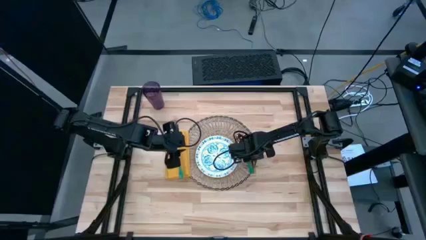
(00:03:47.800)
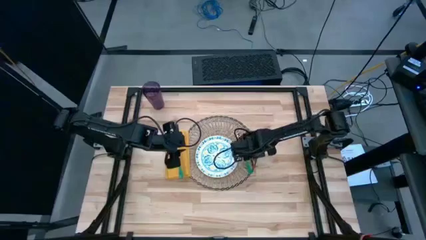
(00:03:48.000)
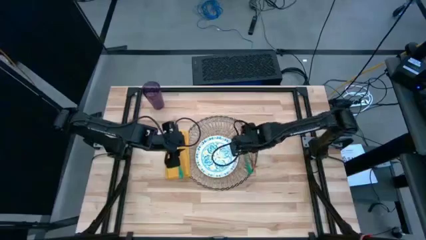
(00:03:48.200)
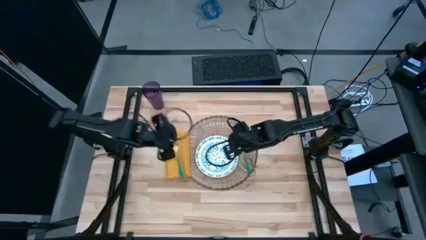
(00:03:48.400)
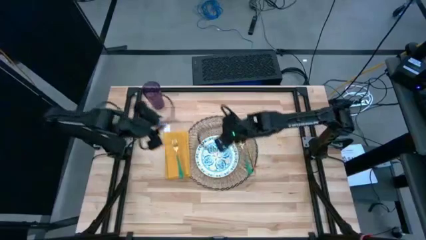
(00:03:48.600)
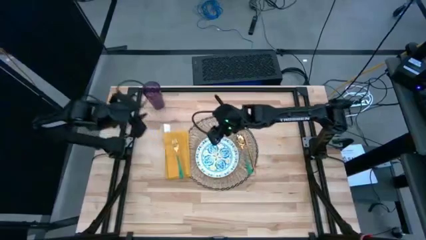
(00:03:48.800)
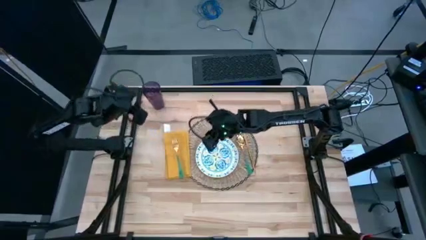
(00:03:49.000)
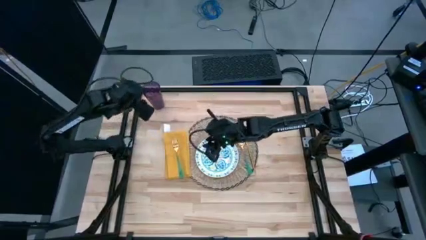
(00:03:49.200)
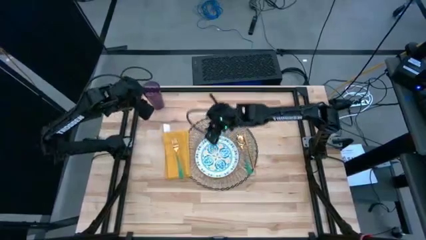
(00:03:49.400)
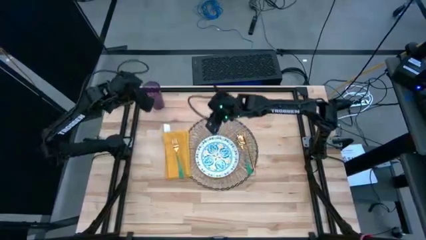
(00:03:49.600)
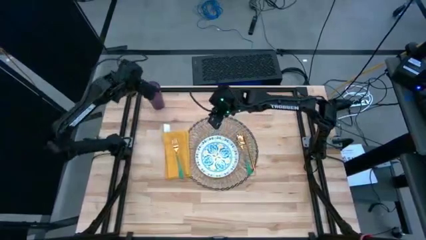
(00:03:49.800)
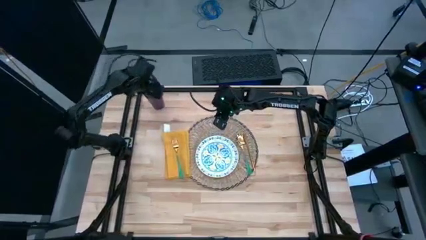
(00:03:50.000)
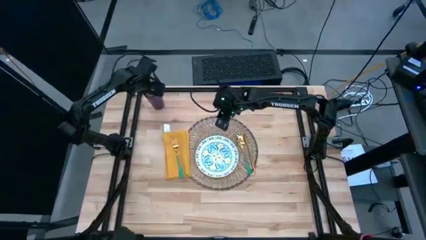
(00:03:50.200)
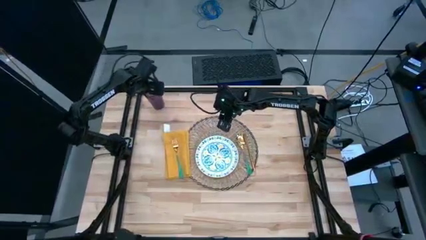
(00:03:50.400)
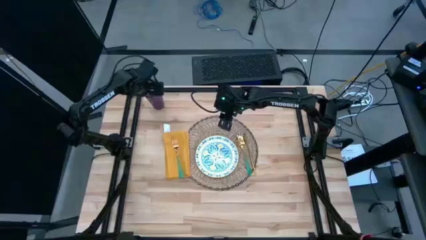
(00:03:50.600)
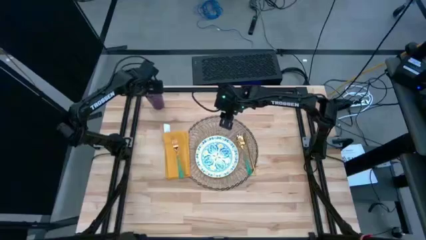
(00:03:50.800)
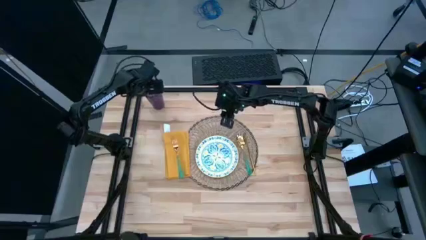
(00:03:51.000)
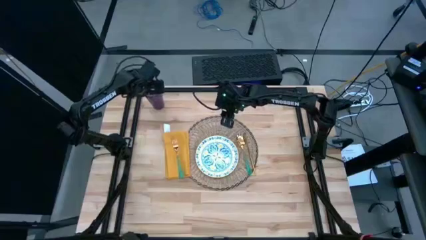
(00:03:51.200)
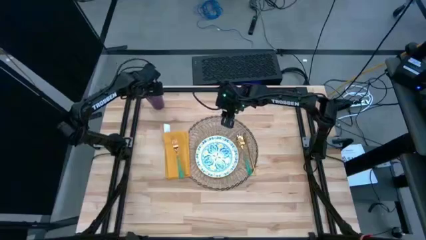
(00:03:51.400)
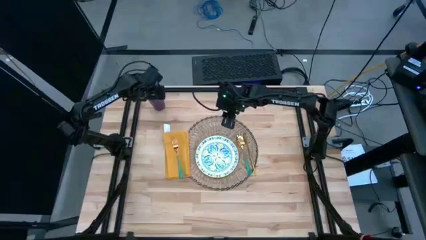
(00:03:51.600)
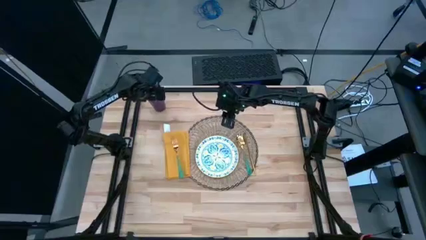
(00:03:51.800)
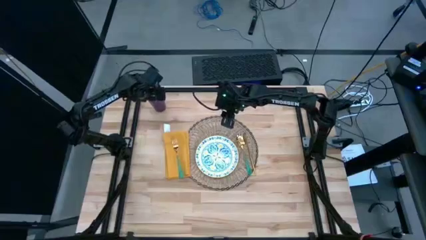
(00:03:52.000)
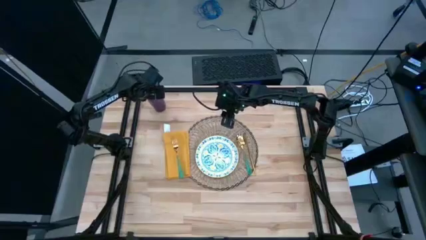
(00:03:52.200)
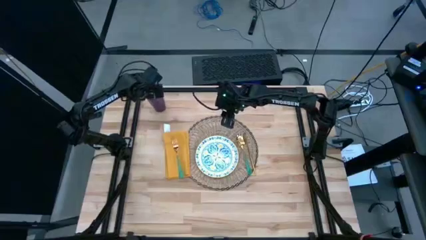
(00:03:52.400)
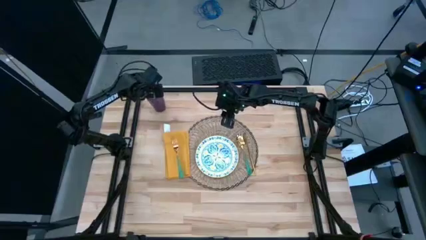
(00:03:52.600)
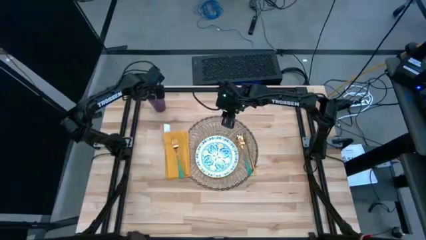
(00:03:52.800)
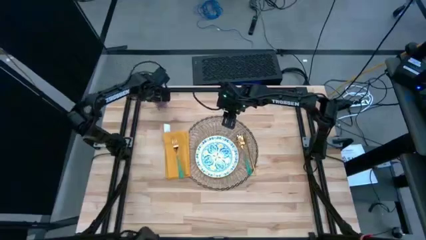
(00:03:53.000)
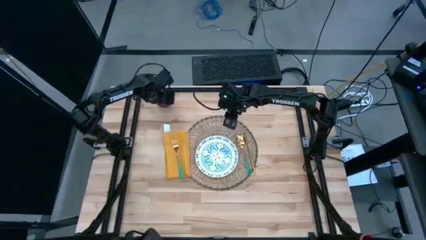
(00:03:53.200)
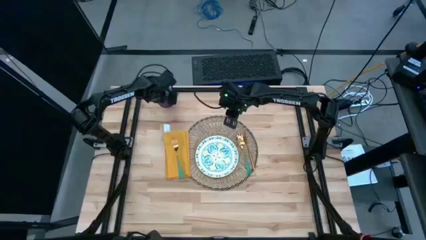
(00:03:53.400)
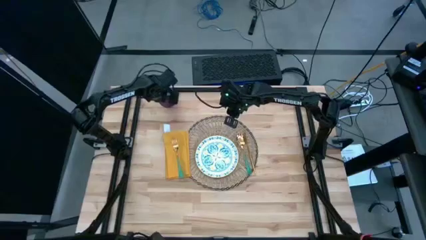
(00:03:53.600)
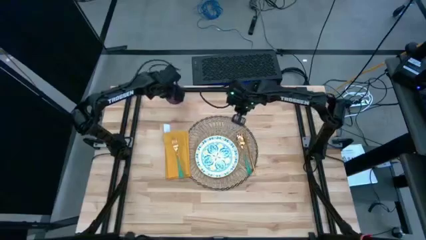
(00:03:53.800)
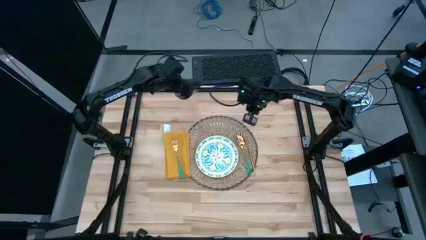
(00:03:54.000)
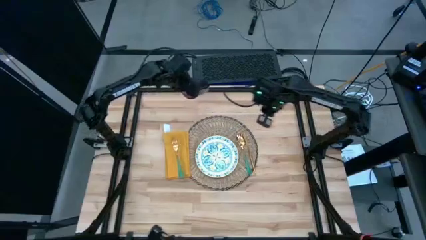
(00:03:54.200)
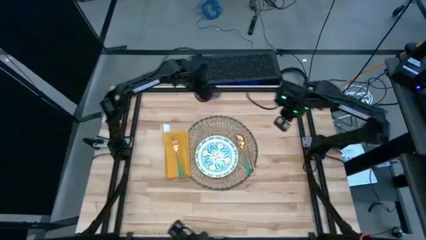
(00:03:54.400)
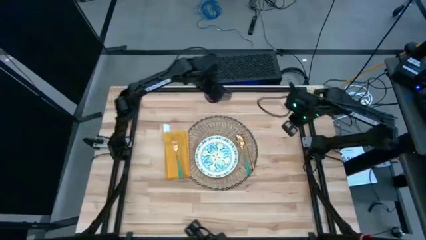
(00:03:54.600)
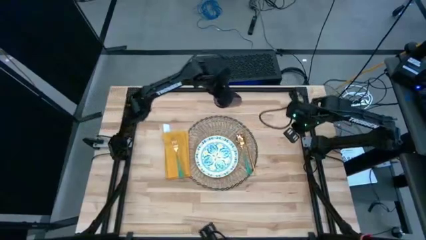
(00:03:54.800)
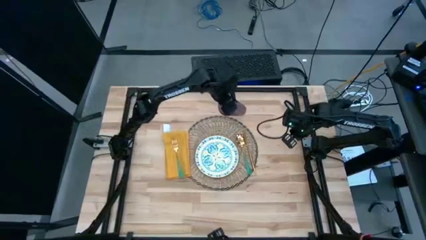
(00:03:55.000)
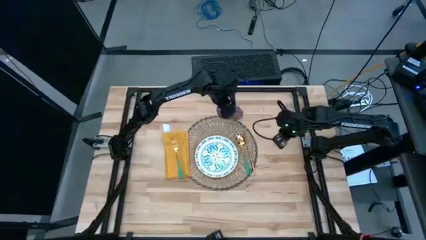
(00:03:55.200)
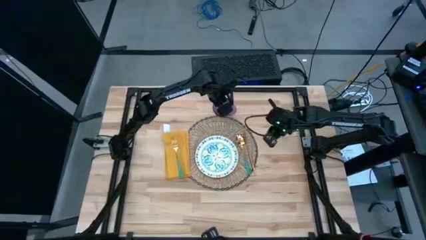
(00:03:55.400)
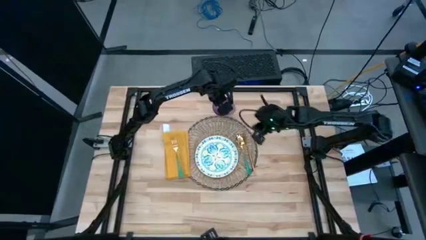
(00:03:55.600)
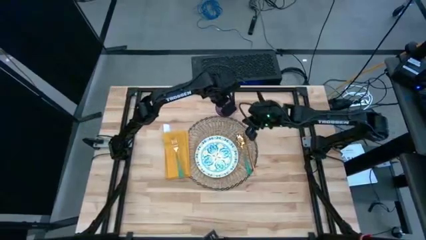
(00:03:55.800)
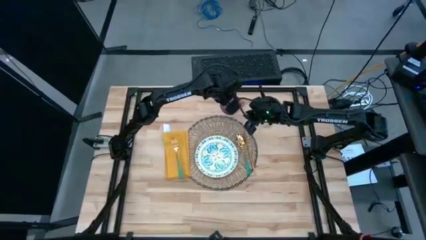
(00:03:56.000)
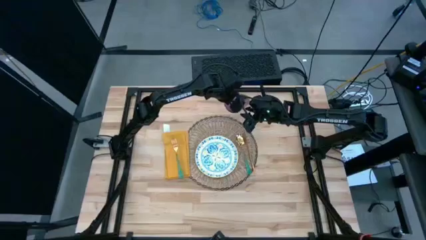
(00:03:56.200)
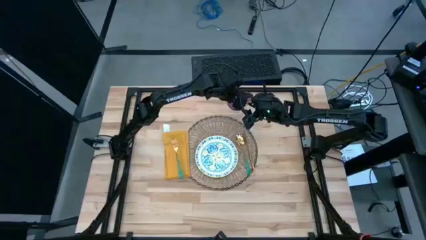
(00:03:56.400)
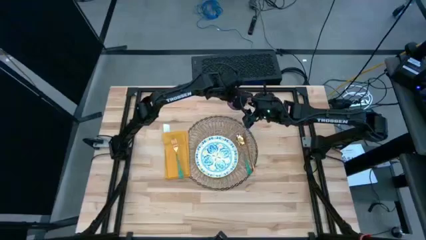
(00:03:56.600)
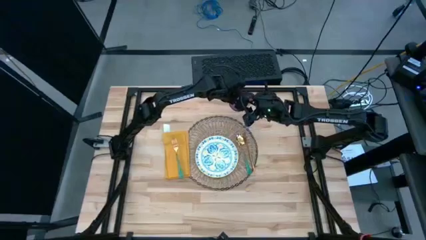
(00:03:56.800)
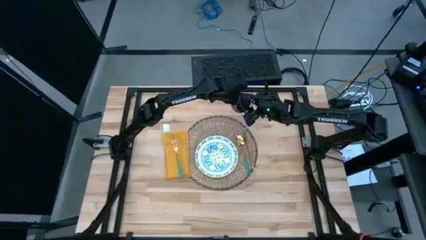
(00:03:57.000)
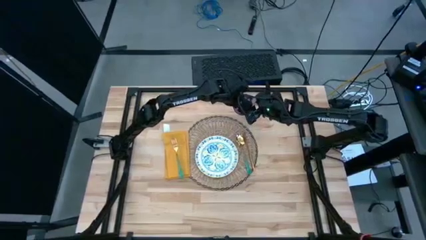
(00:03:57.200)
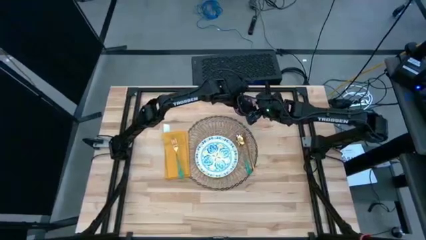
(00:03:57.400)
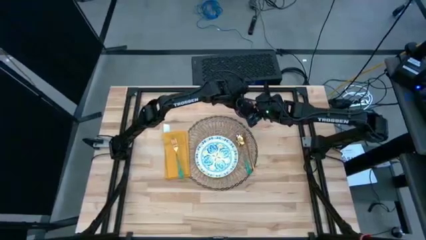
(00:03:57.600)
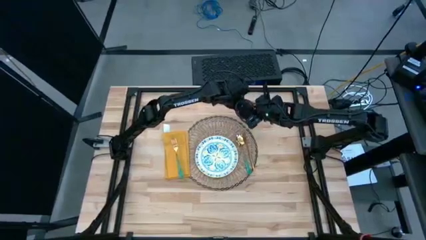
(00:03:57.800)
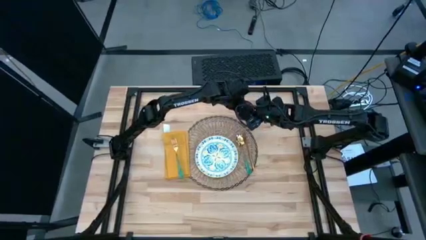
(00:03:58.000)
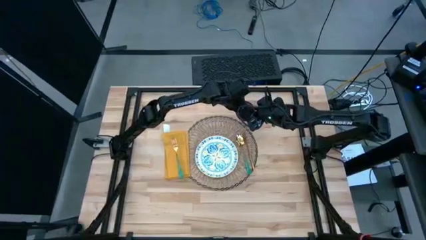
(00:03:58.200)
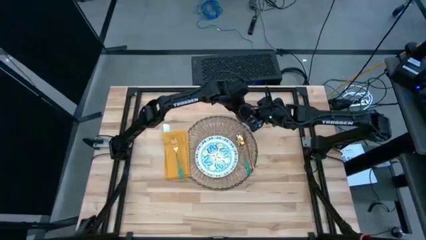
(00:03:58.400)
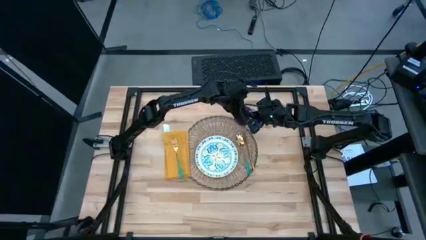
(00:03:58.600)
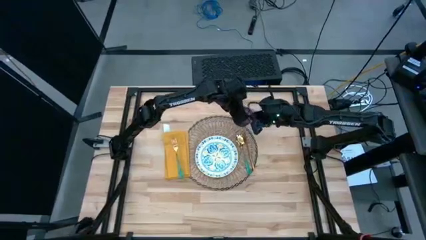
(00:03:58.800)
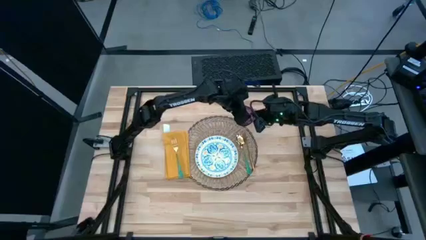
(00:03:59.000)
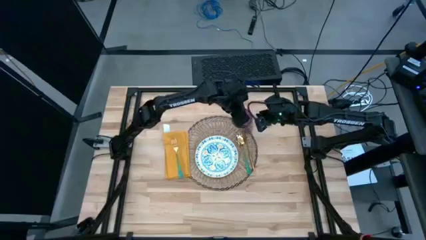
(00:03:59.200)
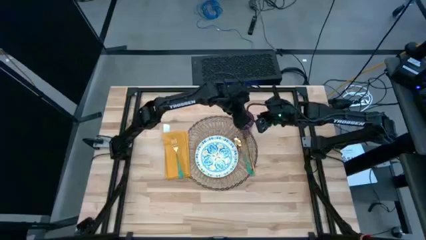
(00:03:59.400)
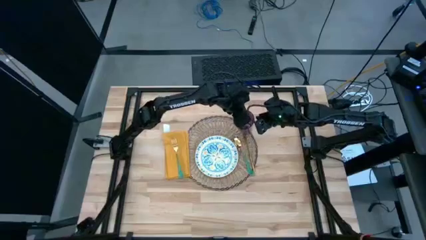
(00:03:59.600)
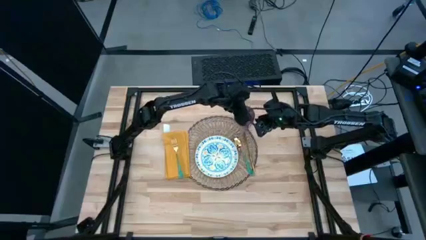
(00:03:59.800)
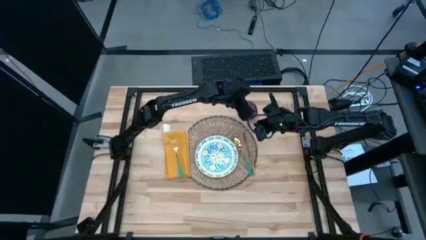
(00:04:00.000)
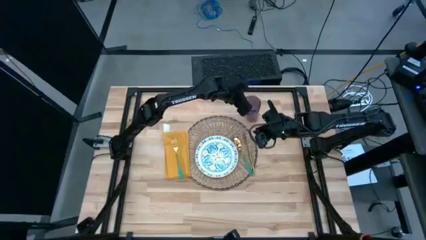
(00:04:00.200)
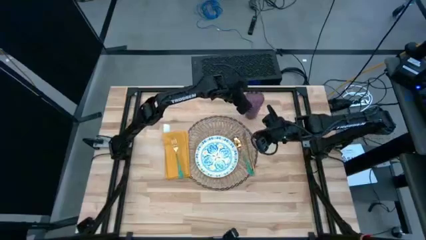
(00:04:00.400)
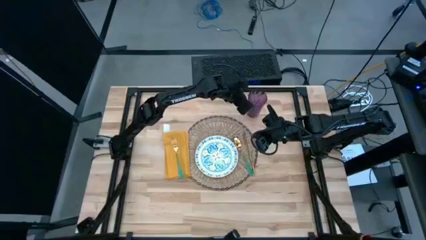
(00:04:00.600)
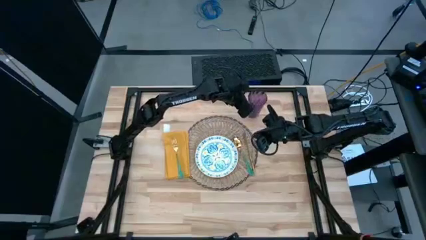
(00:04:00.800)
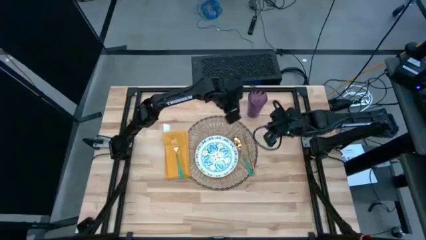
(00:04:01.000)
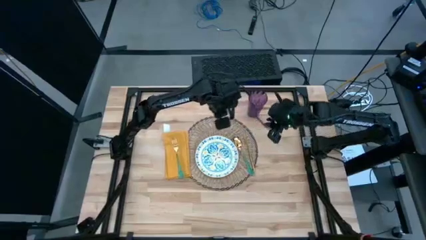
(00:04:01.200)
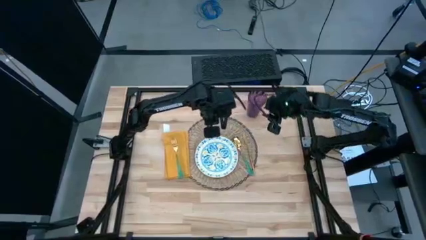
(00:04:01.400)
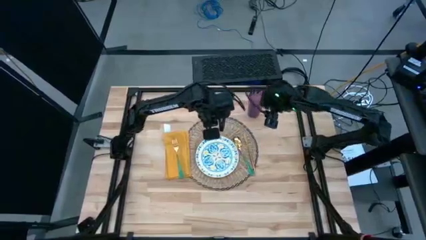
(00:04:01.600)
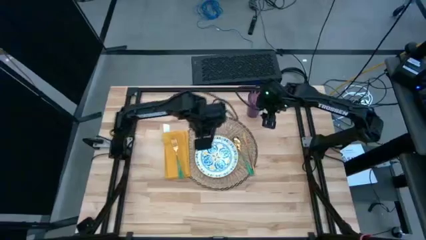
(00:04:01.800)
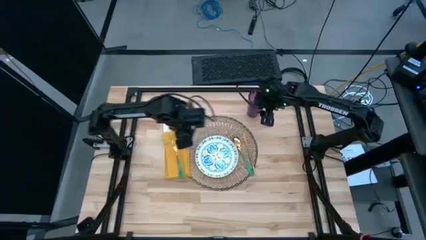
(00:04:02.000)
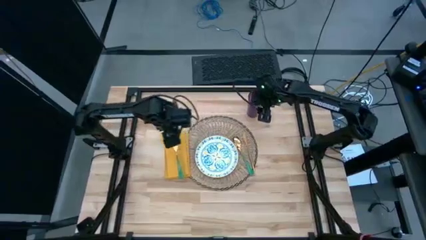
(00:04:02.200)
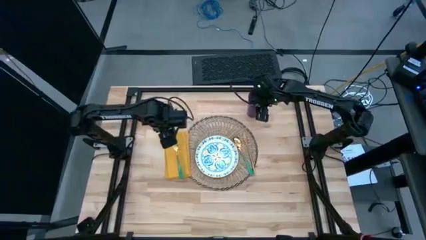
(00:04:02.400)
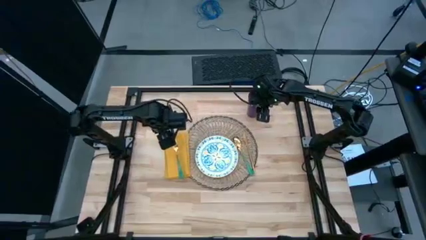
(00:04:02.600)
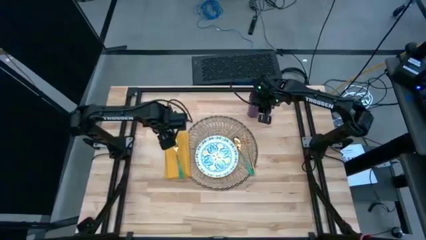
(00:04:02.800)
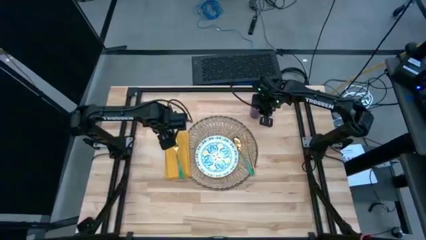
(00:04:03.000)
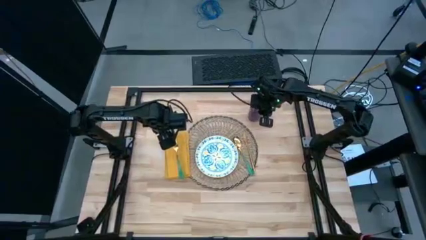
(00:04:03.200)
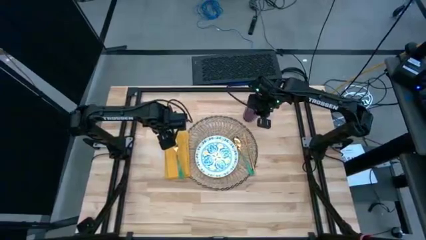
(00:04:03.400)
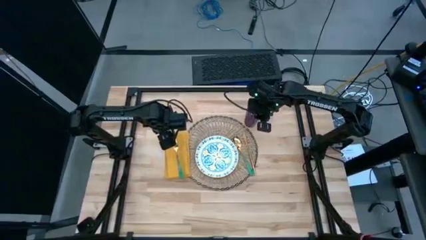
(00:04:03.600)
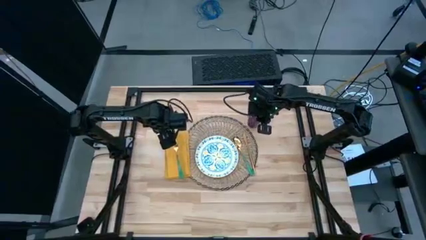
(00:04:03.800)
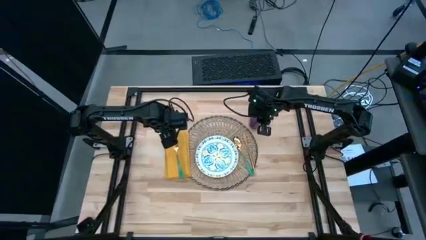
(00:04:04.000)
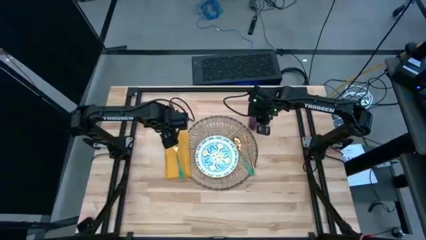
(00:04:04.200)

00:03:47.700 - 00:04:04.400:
Task: Set table place
Put the purple cup to the top right of the tablemat
